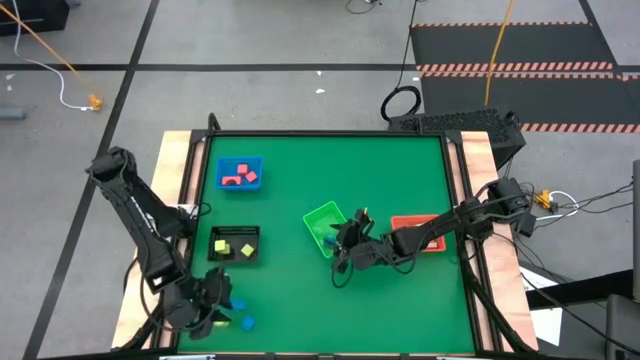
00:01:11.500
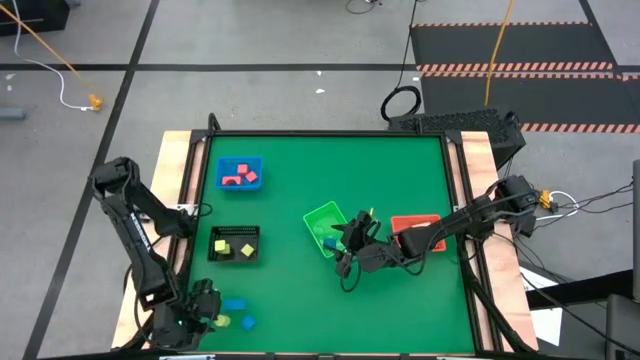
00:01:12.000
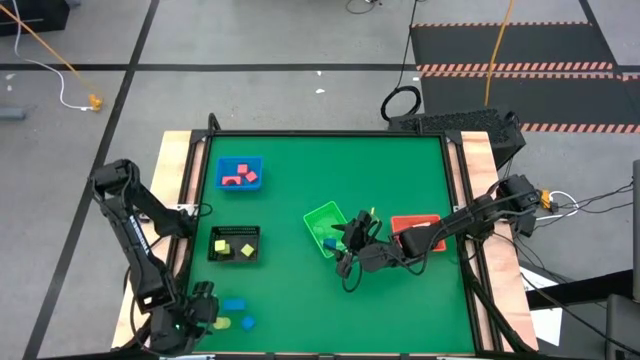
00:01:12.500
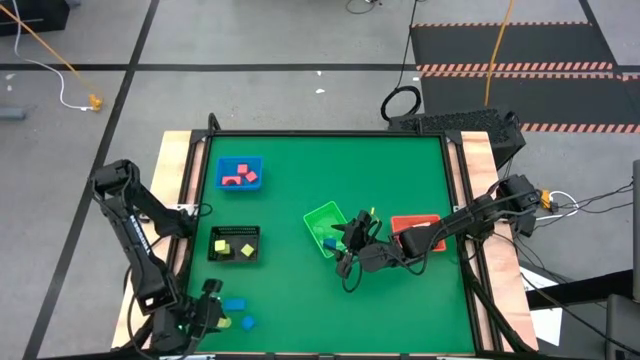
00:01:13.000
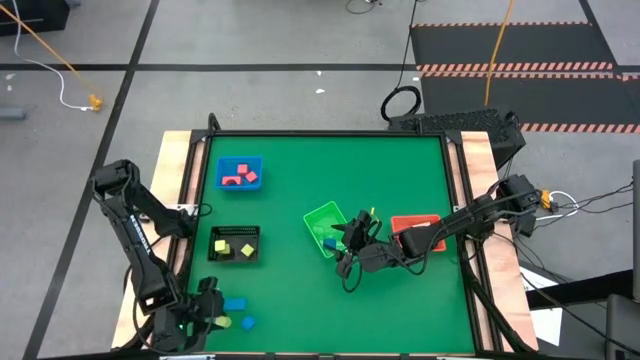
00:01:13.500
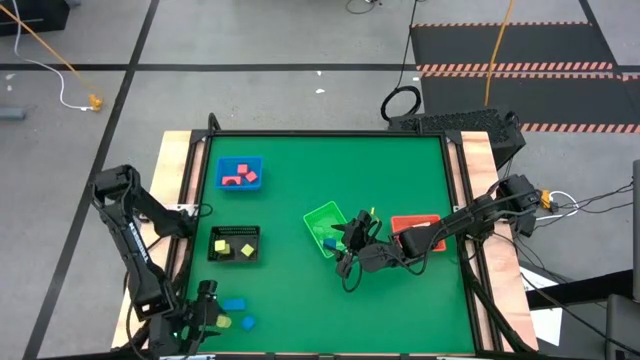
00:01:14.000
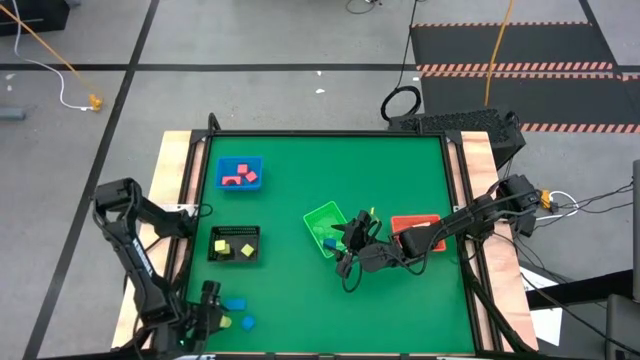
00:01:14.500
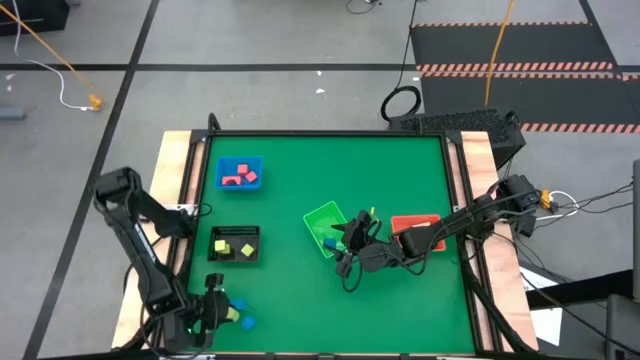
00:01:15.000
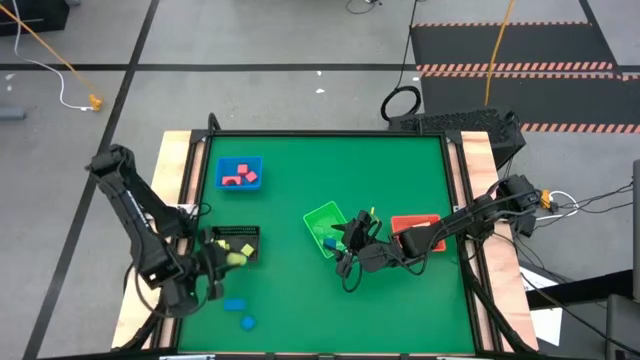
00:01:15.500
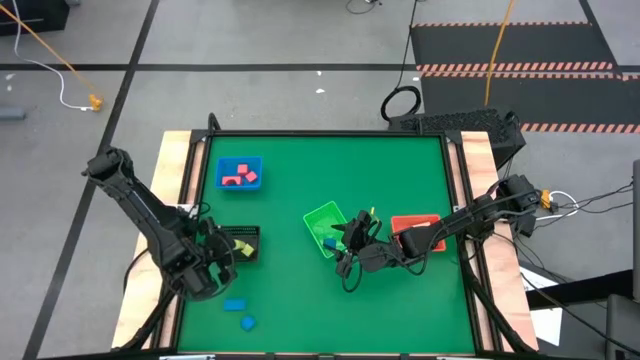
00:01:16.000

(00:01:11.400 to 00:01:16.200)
Task: Sort & place blocks by color
Put the light green block into the black basket

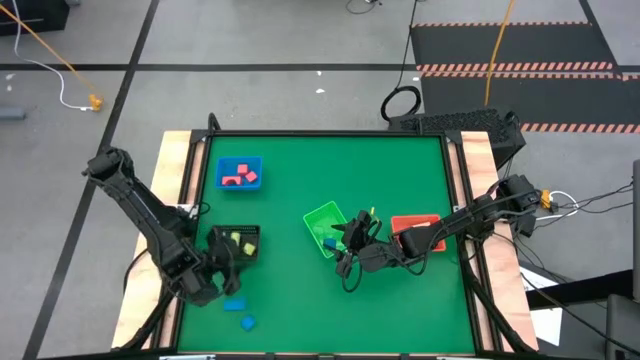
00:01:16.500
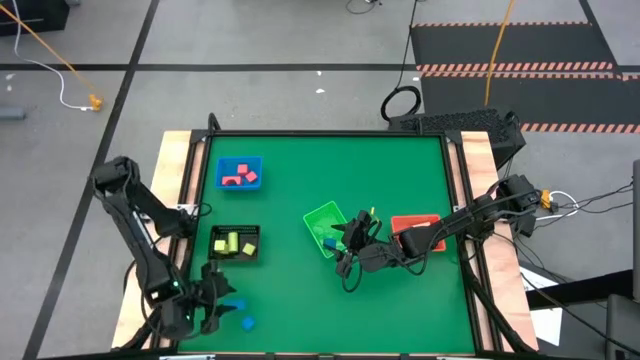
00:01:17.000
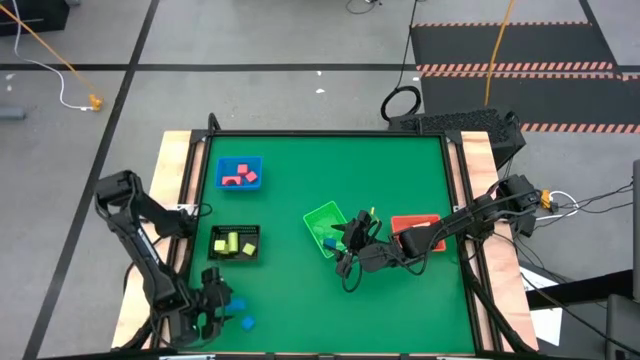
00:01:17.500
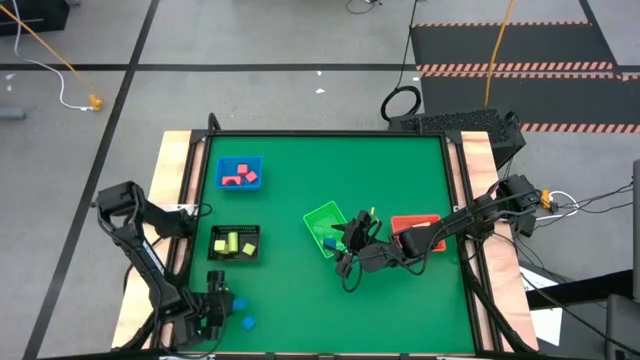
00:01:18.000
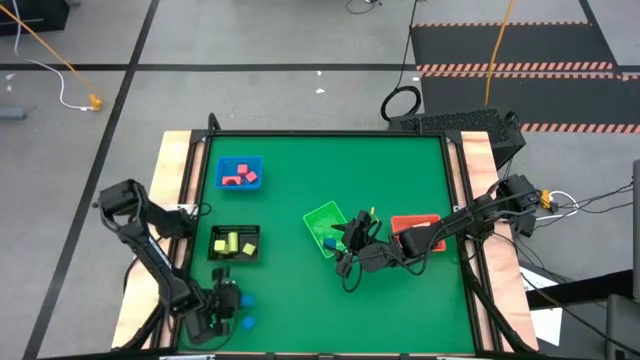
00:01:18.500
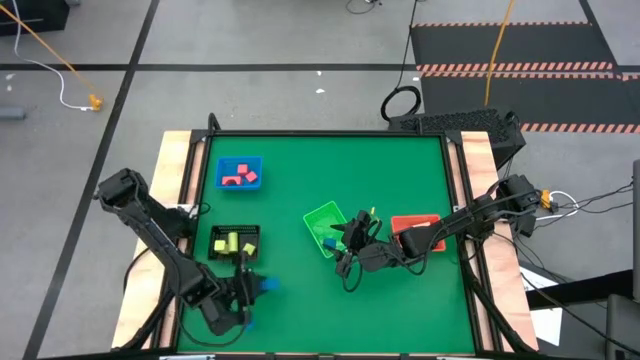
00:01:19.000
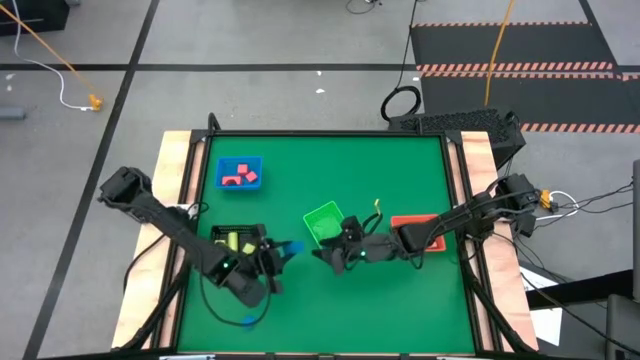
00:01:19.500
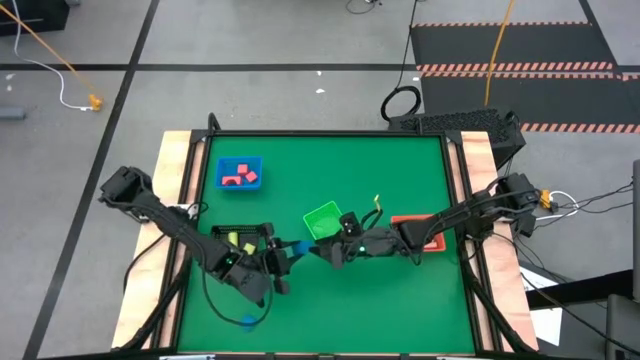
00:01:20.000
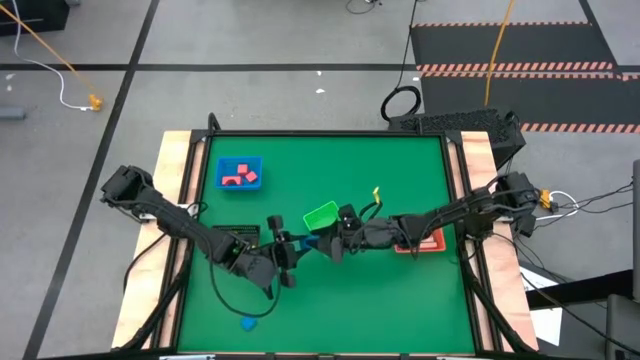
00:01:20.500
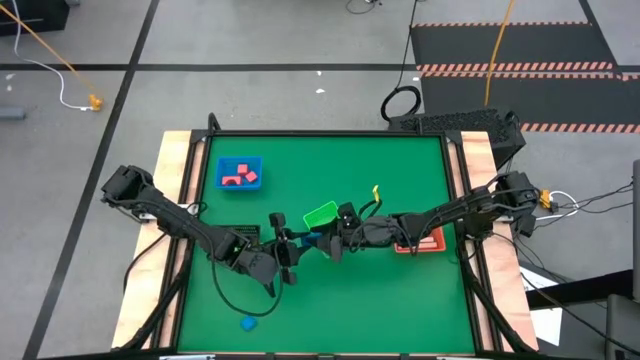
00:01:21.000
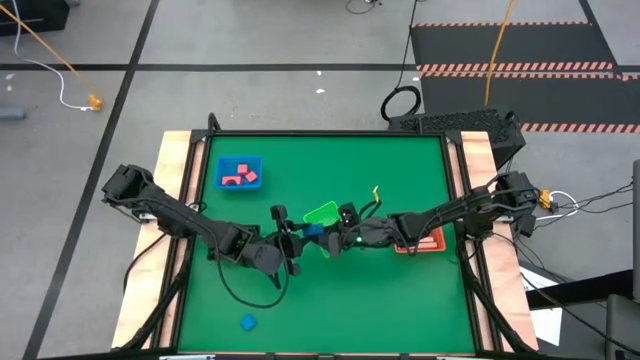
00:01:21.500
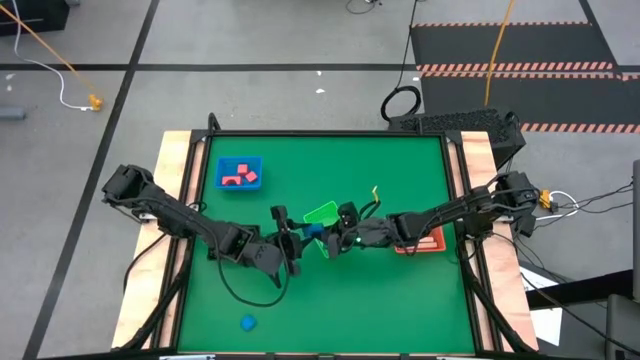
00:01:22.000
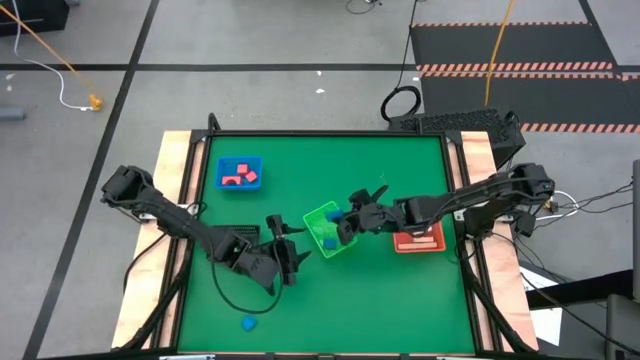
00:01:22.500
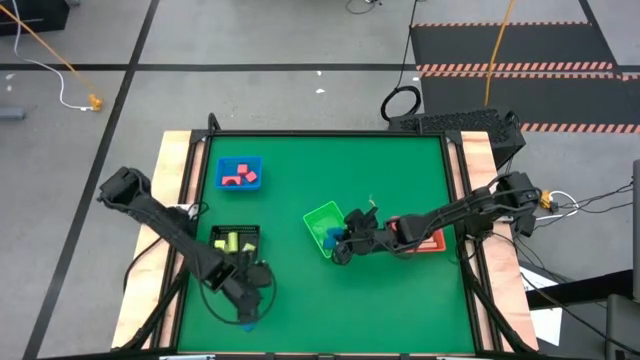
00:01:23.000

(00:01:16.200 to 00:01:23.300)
Put the top blue block into the green basket

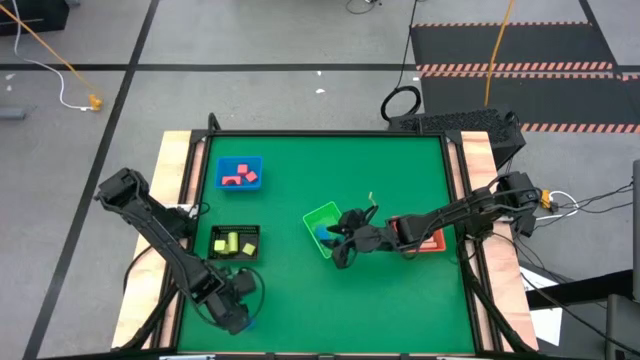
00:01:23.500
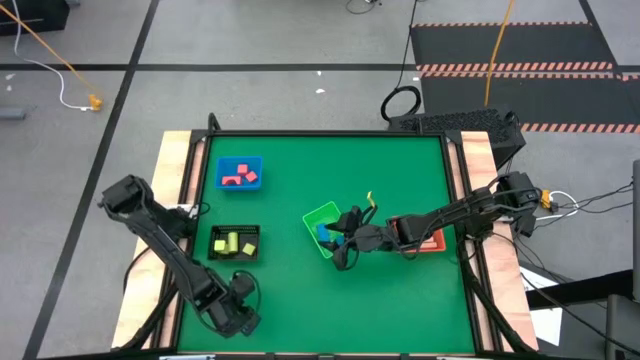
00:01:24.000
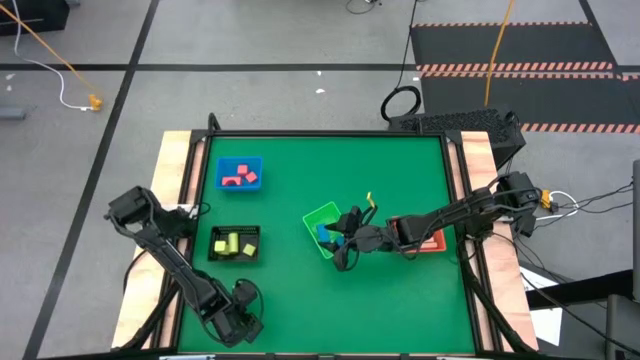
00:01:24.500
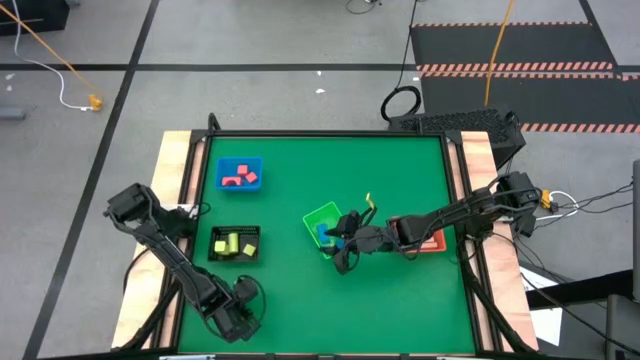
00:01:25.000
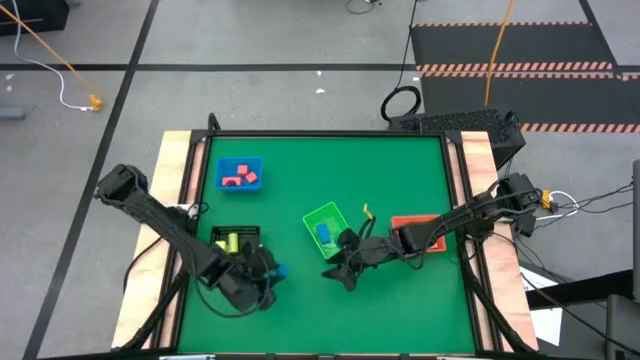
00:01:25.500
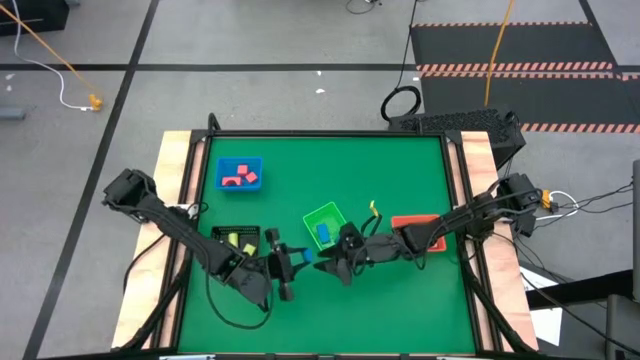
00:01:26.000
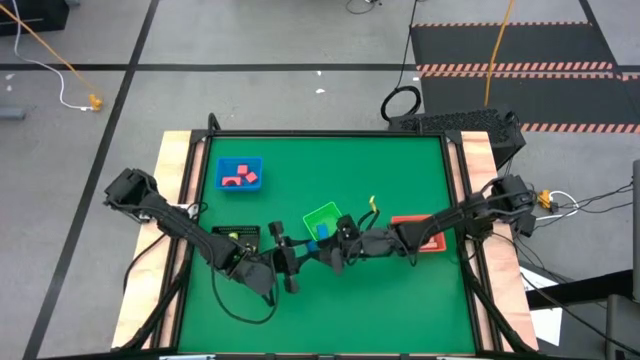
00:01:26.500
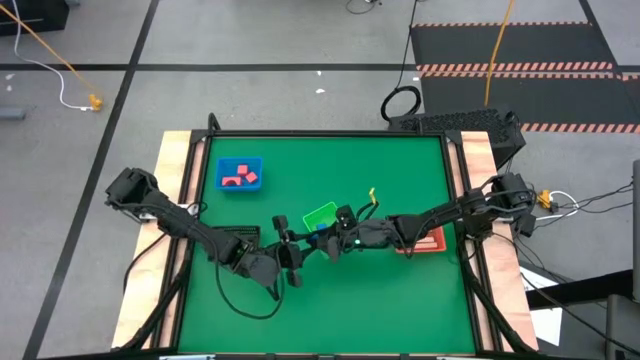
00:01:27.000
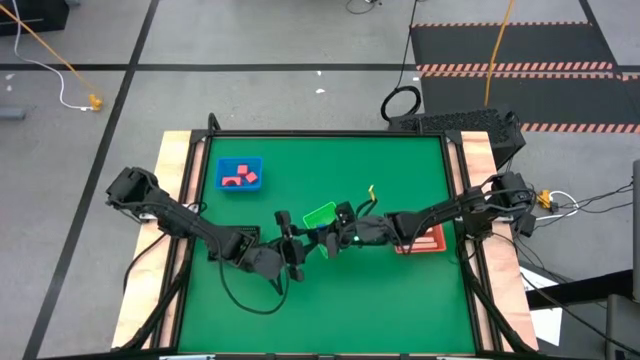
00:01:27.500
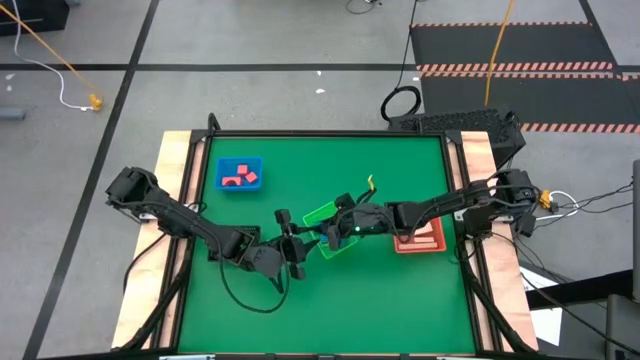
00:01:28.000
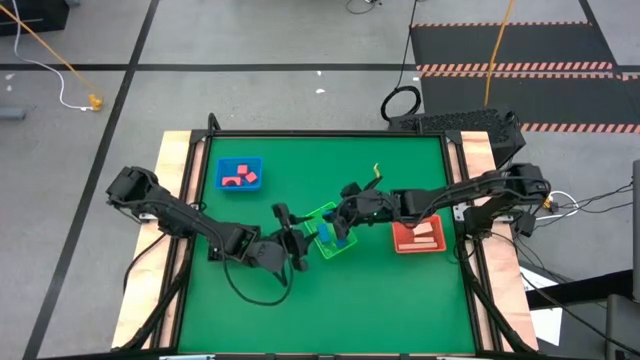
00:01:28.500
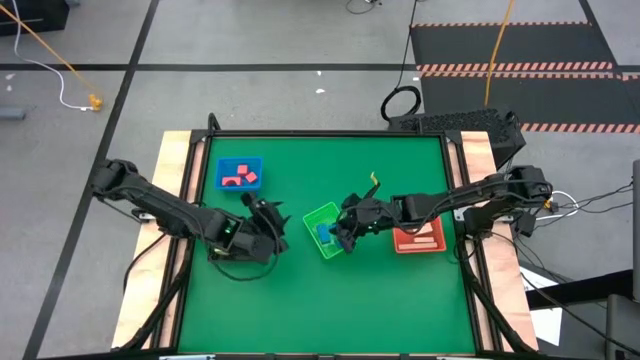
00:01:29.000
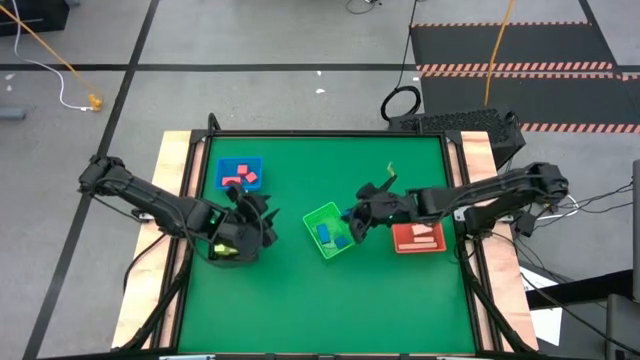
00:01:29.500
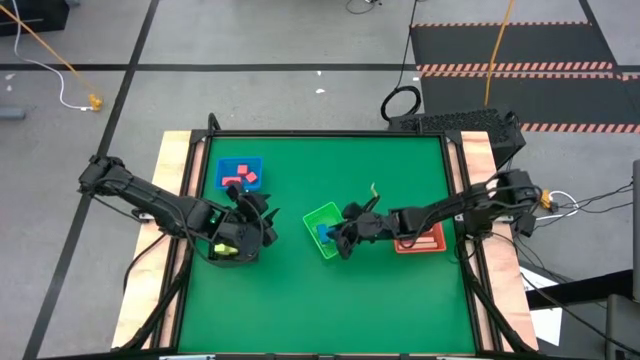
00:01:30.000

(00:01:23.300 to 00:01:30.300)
Put the blue block into the green basket

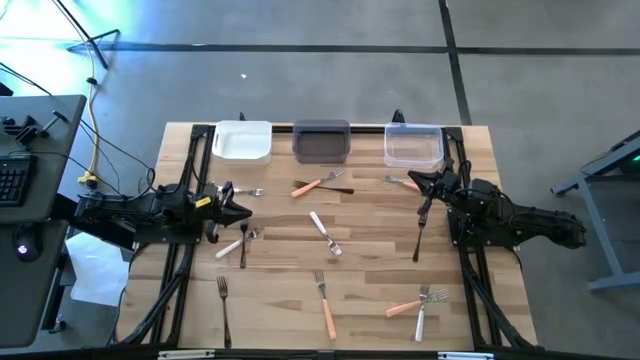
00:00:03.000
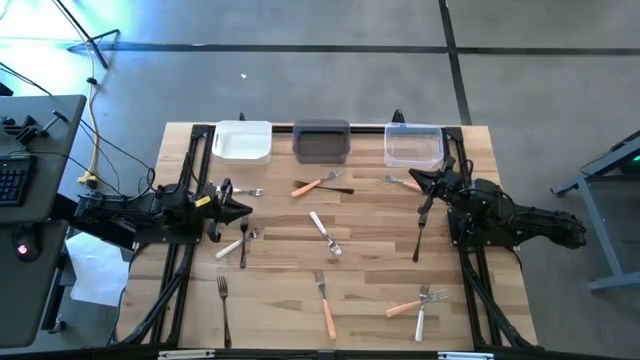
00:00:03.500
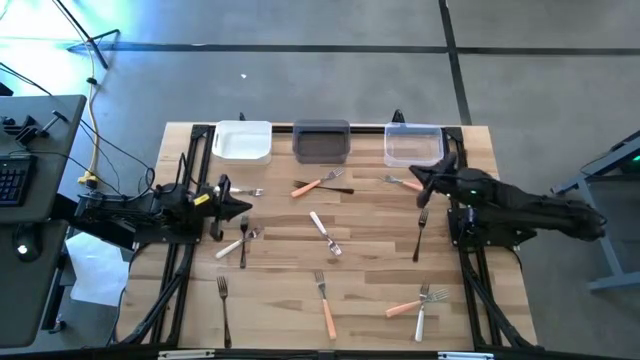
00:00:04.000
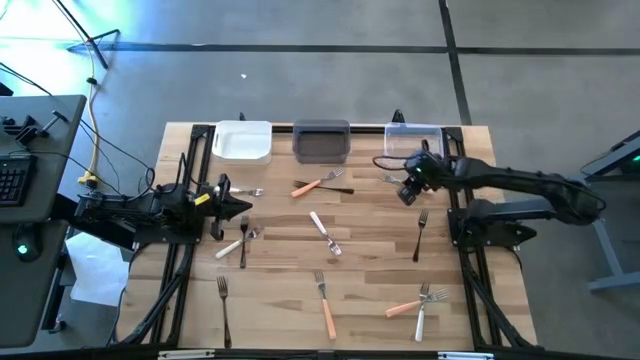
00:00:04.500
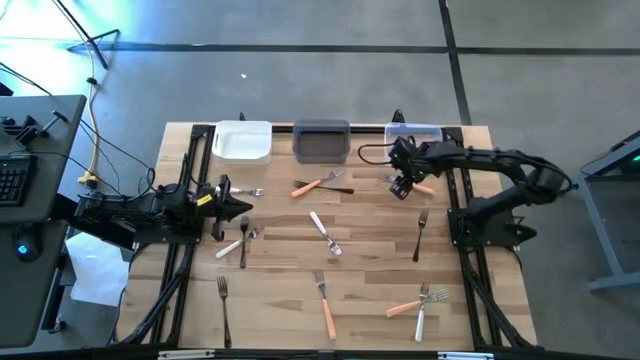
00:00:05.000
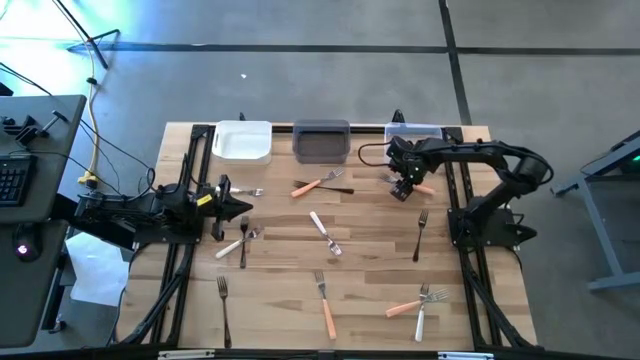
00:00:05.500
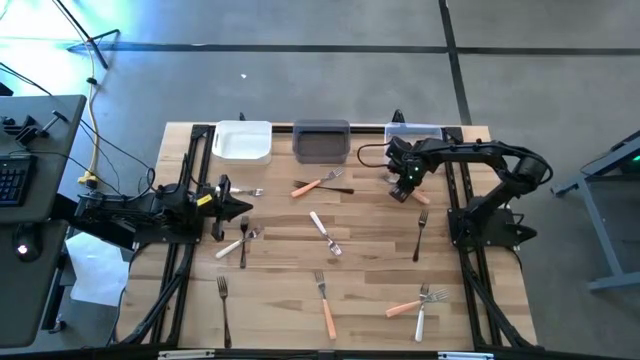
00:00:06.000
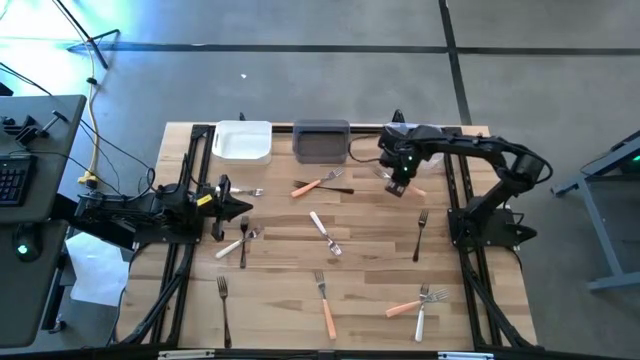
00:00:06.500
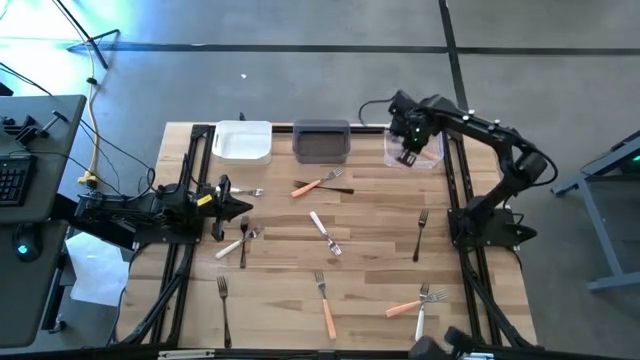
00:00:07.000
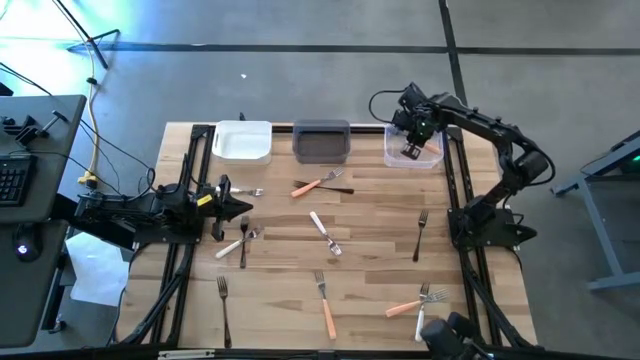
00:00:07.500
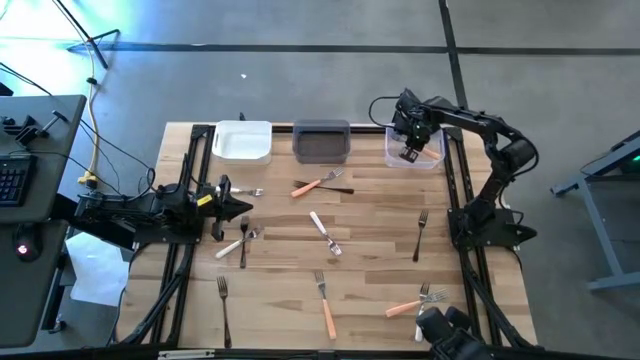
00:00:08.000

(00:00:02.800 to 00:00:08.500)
Task: Sort silverware by color (type)
Put the orange fork into the transparent bin
